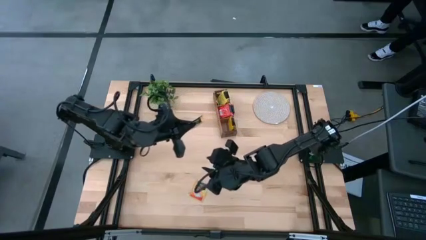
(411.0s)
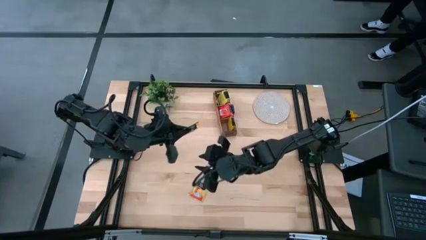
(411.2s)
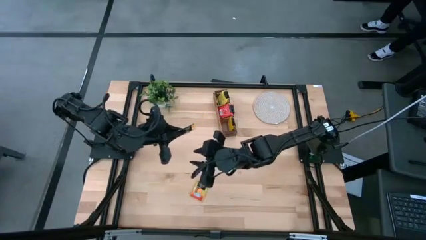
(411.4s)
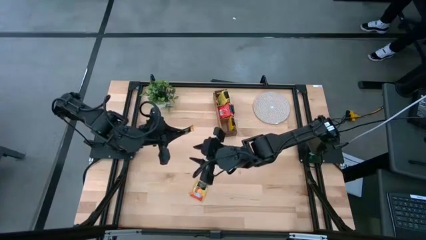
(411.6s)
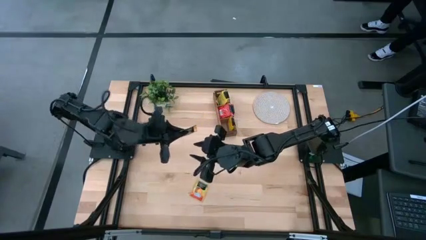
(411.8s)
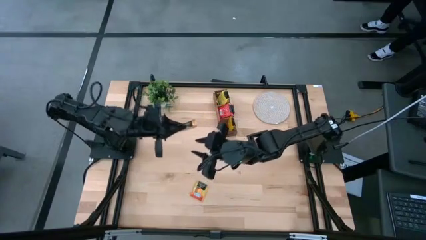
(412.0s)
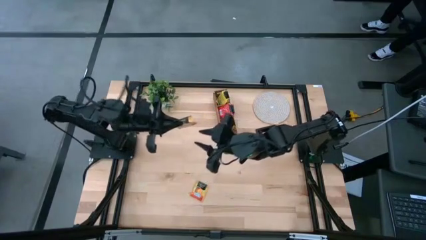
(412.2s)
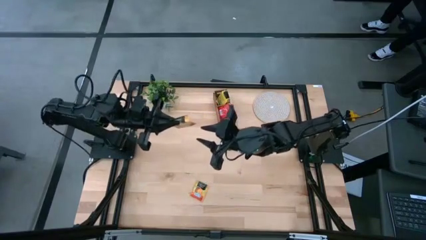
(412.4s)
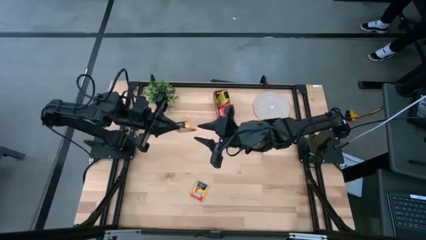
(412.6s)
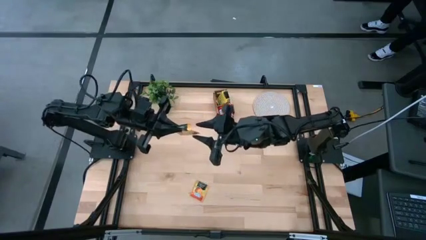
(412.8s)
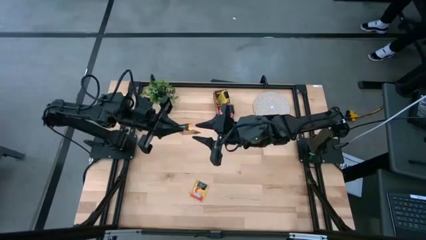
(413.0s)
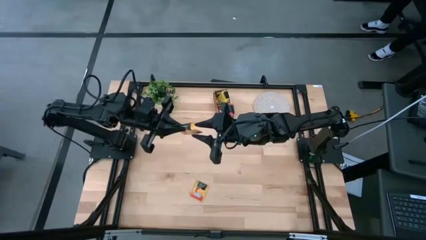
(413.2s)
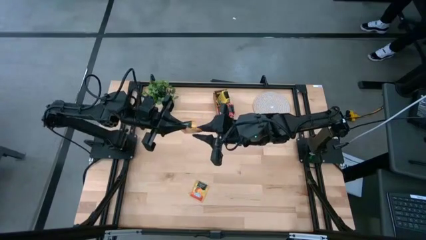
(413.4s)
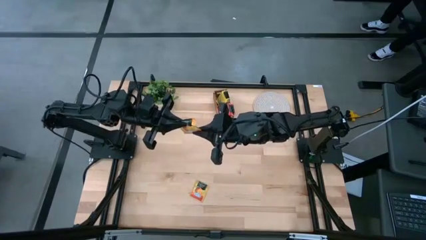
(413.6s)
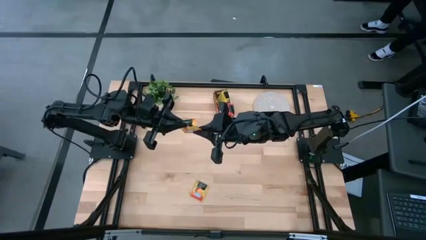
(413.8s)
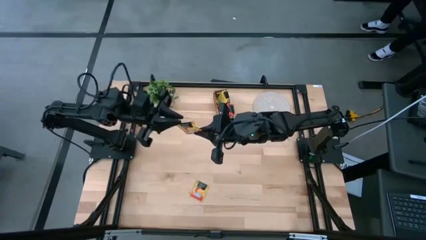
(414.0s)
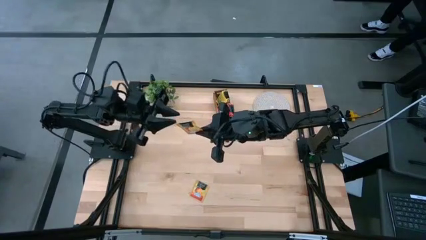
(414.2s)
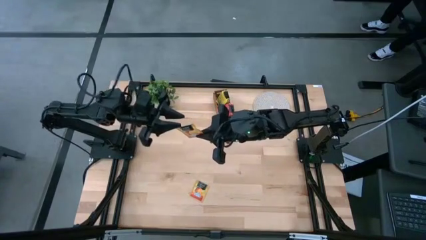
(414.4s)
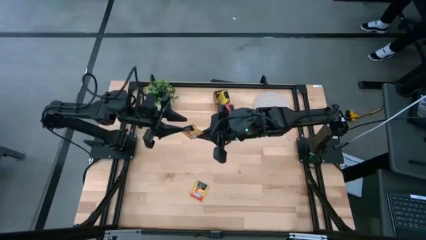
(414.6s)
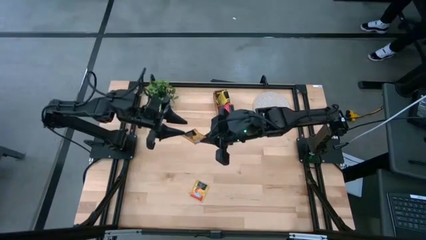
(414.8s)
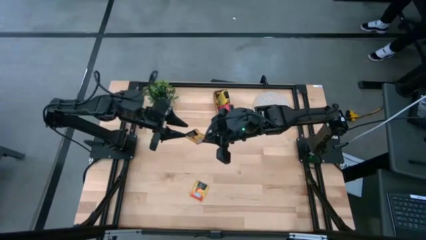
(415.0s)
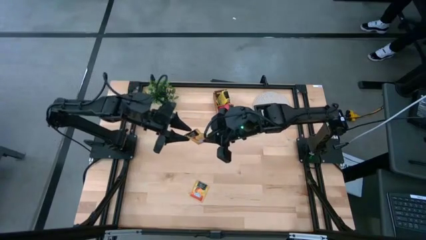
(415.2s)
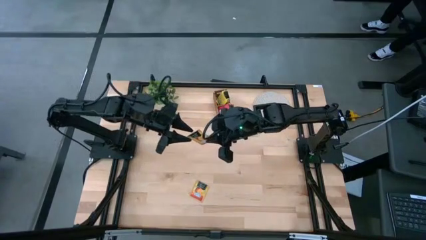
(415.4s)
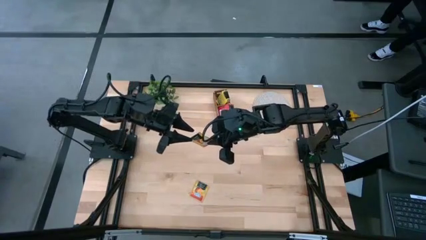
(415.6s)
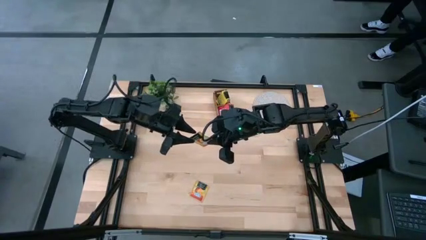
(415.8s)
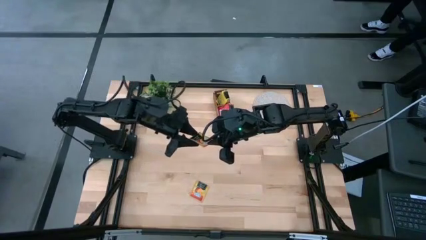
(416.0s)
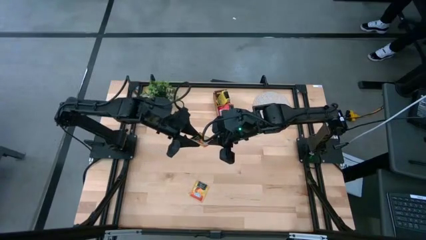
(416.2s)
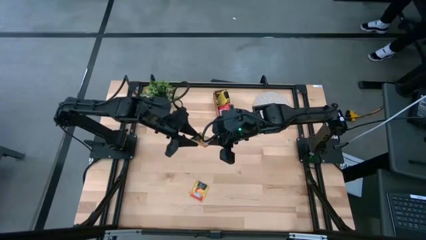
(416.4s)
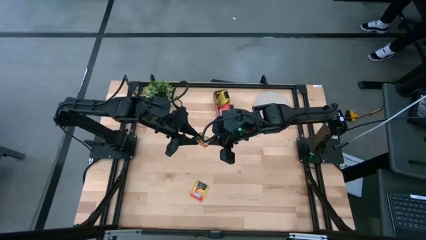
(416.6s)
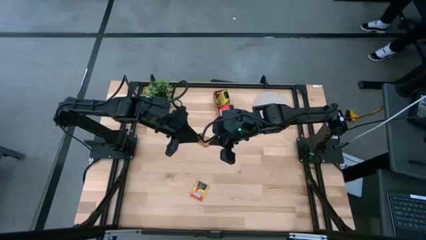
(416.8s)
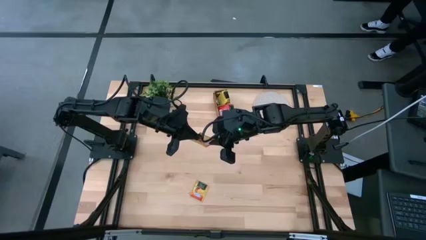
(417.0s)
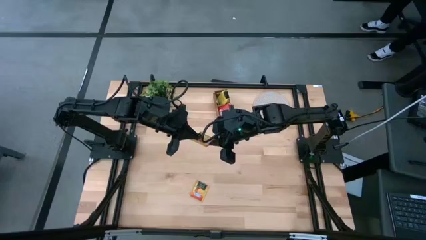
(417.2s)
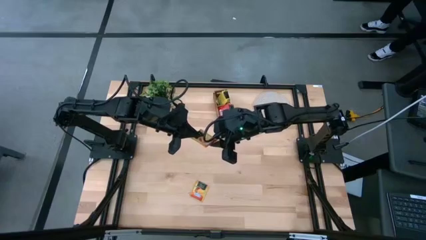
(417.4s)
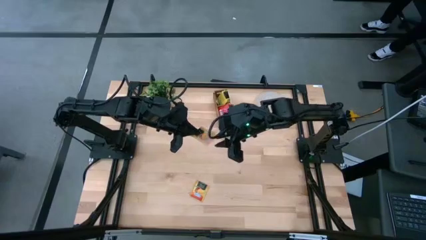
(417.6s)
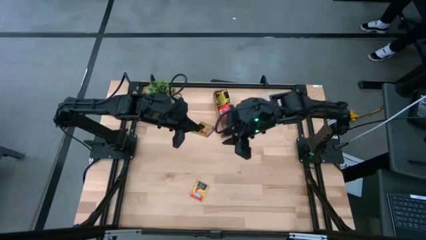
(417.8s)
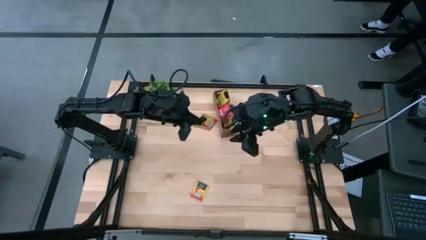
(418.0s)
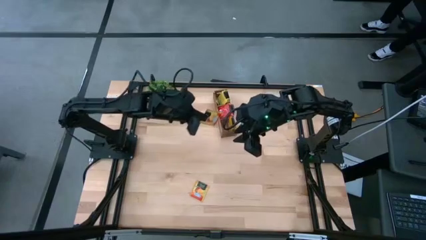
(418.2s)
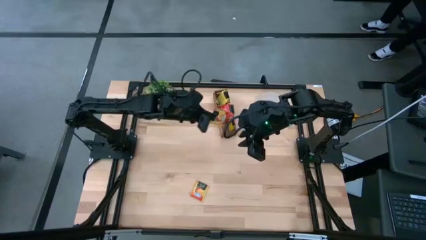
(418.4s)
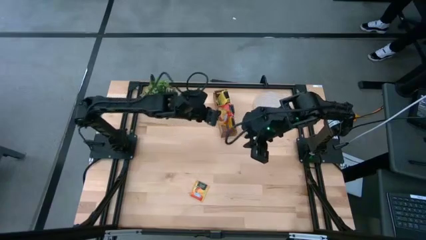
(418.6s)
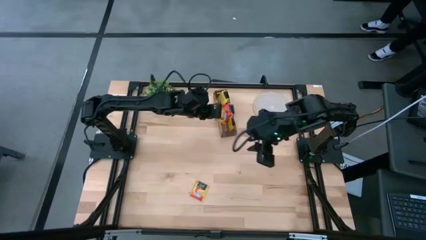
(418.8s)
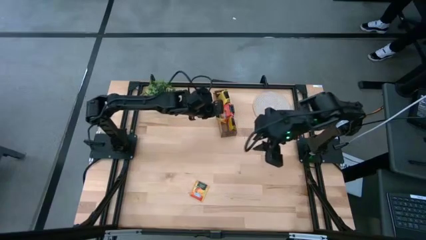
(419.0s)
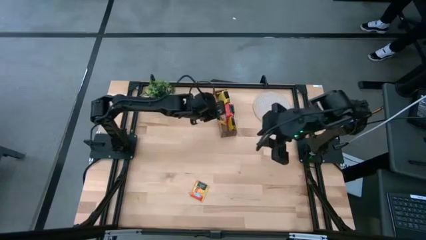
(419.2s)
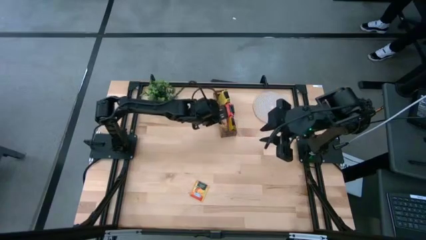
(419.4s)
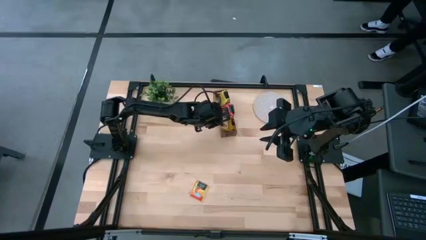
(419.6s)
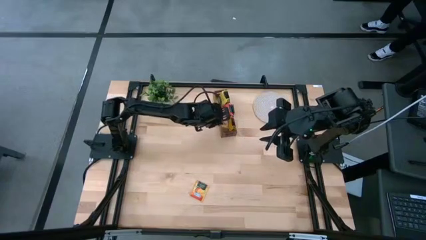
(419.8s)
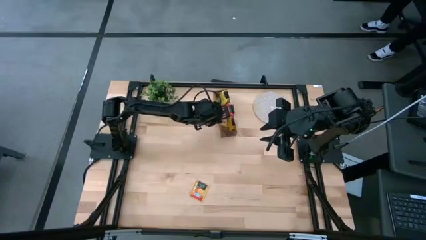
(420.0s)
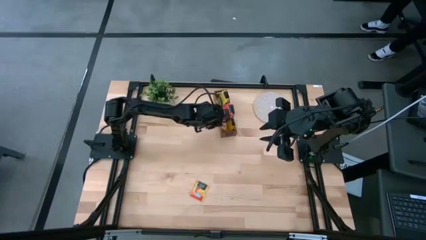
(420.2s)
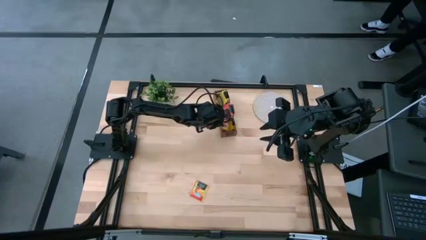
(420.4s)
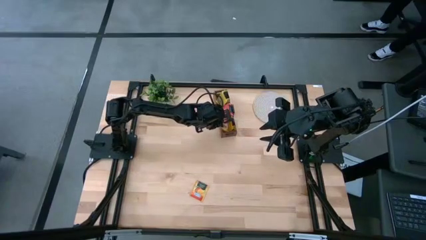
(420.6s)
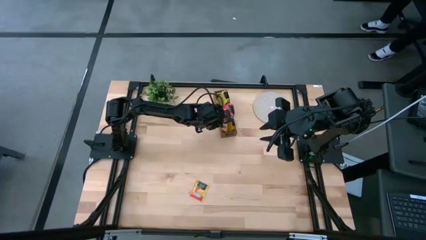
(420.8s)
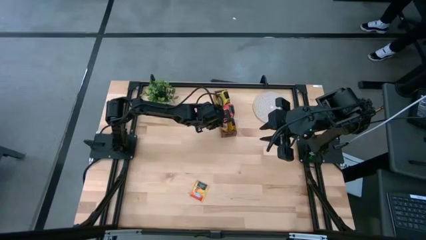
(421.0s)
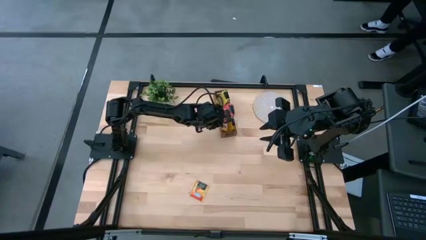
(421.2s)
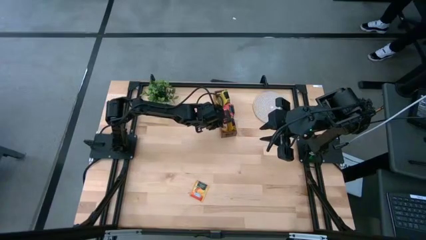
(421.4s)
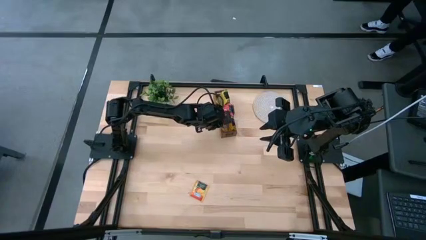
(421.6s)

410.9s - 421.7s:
Task: Pick & Place Tea
Put the orange tea bag into the left section of the wooden organizer

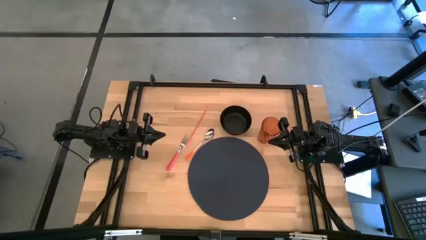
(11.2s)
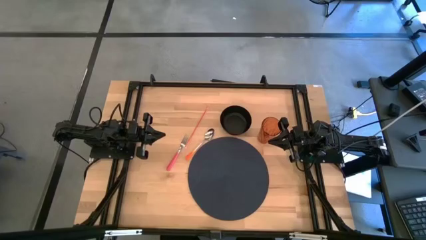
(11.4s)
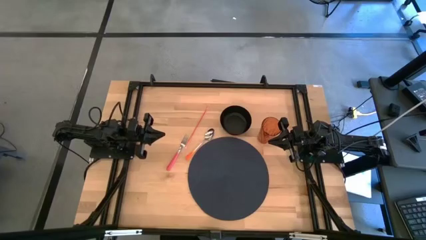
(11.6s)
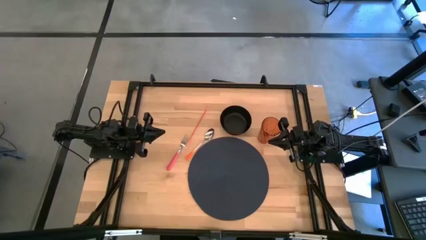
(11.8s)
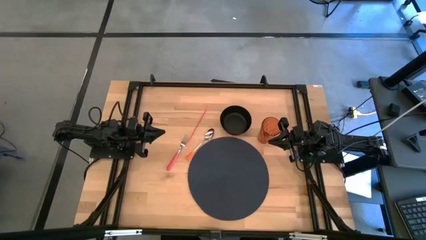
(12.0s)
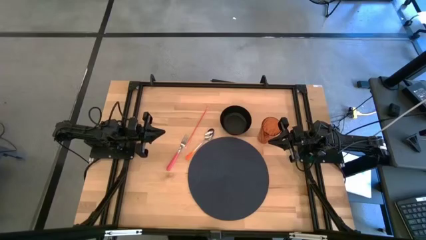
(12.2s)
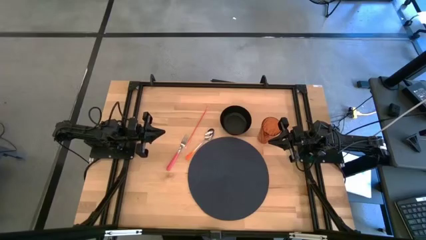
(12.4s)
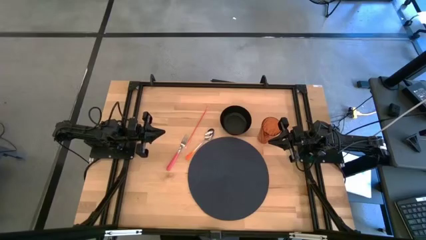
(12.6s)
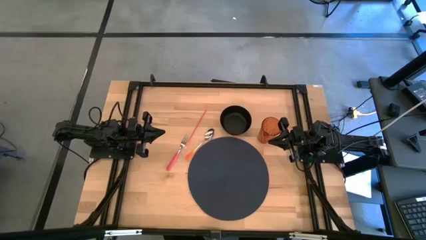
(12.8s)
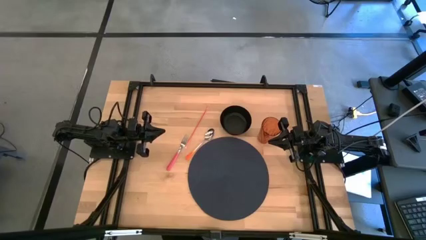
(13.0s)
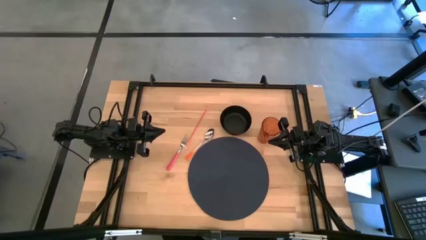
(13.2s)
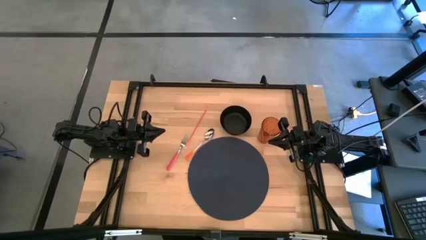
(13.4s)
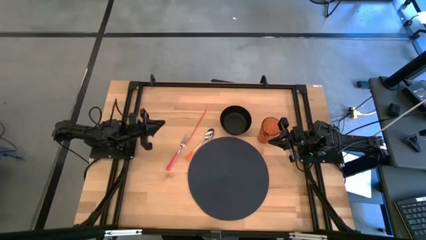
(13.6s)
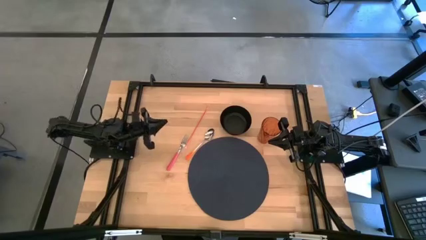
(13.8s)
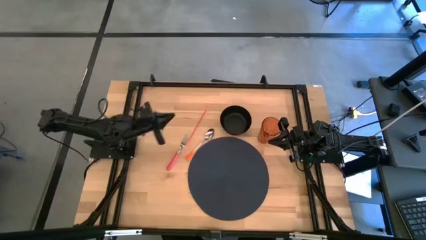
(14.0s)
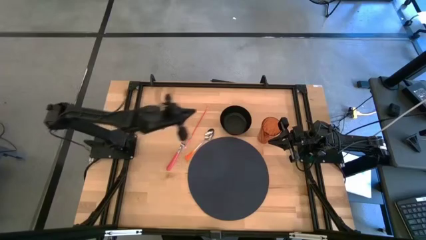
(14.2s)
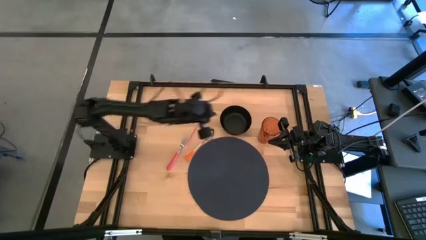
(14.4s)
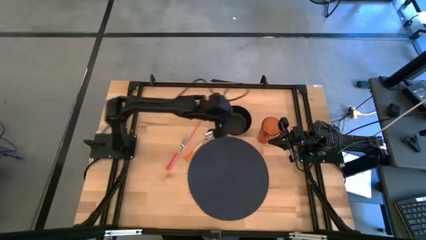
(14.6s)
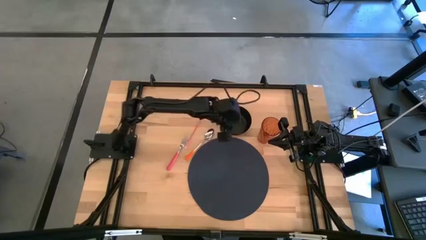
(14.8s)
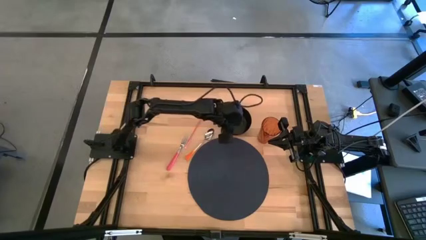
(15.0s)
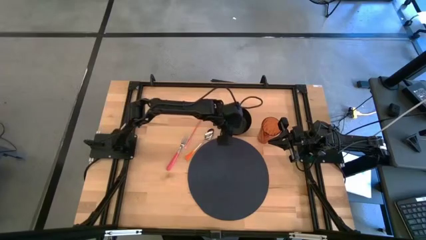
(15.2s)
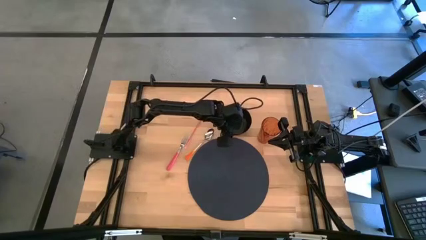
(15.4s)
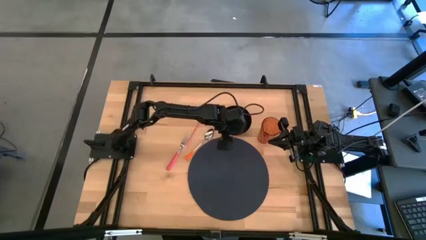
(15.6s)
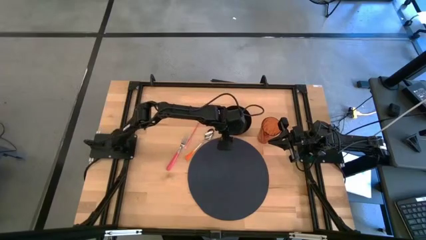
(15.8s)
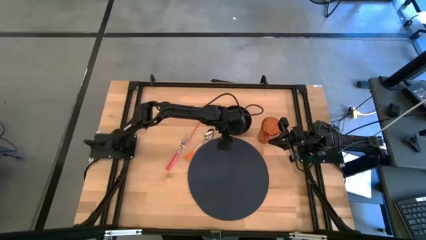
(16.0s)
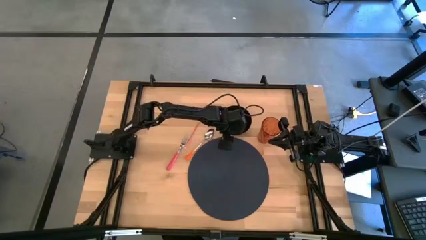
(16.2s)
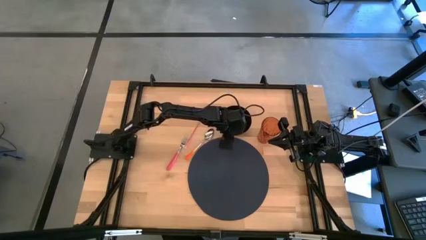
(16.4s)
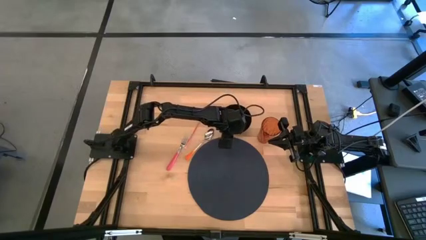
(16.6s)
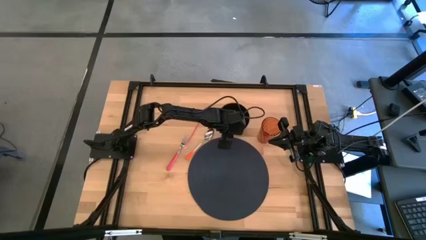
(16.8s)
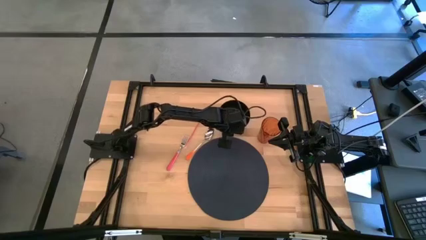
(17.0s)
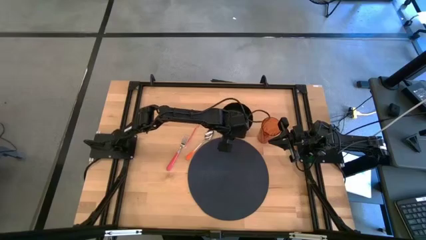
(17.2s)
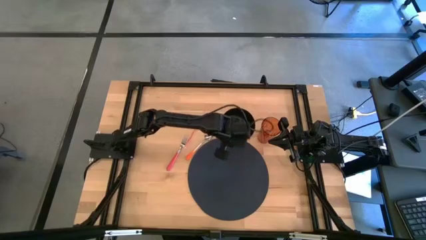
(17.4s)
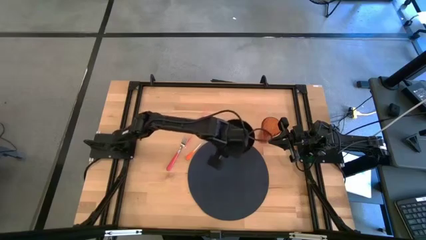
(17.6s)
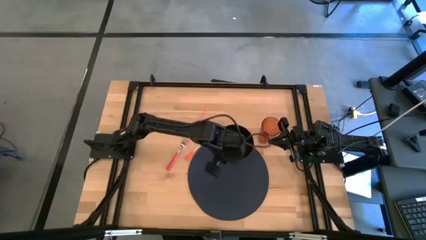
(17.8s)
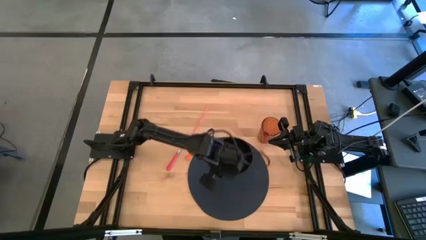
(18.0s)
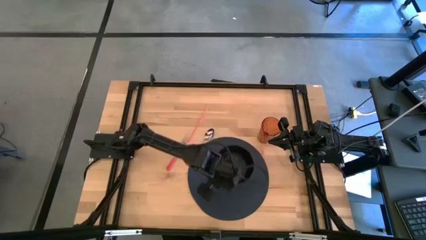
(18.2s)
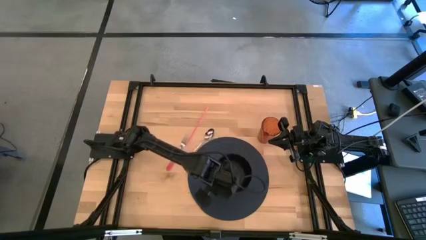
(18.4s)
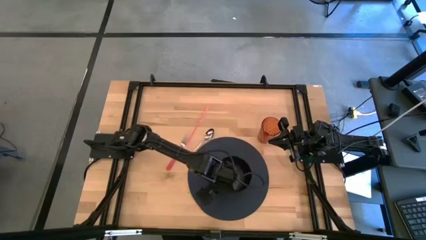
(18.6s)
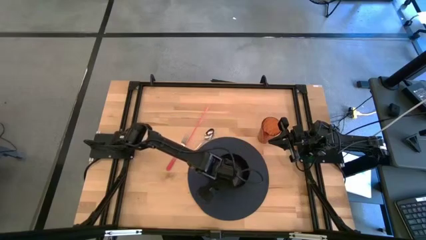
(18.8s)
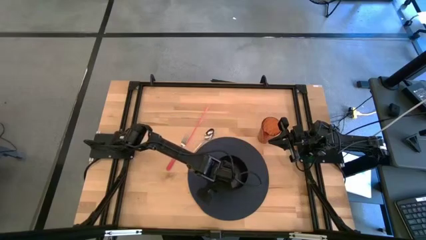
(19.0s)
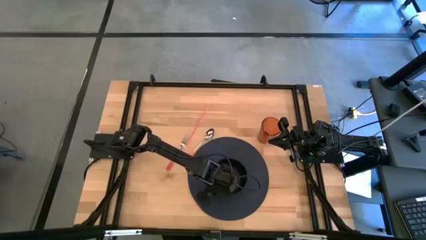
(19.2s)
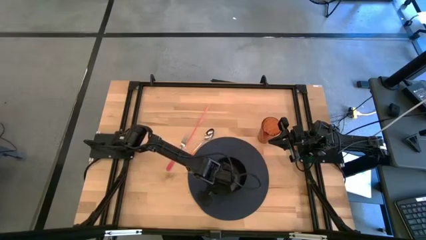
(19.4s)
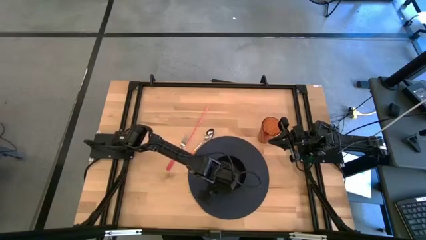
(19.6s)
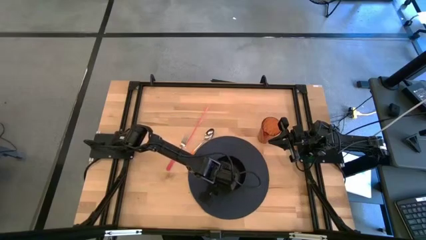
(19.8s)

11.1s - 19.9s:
Task: Pick & Place Utensil
Put the black bowl in the center of the black mat
